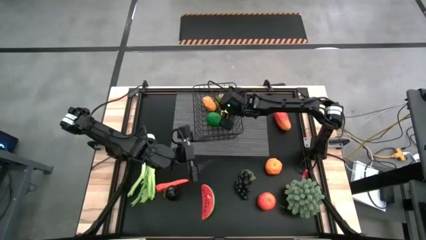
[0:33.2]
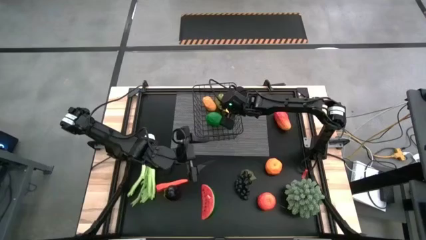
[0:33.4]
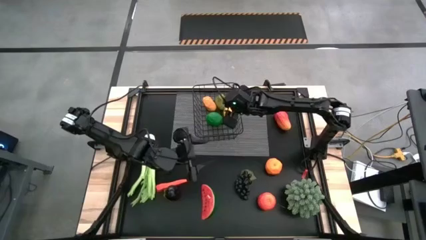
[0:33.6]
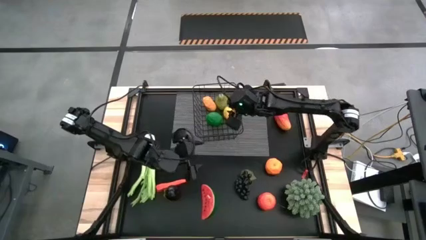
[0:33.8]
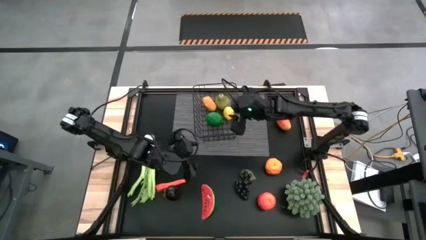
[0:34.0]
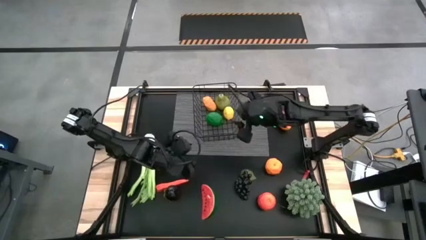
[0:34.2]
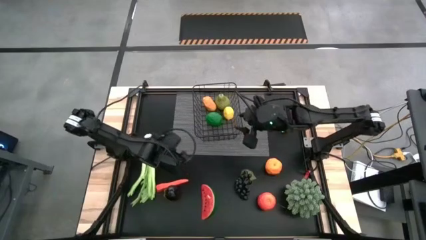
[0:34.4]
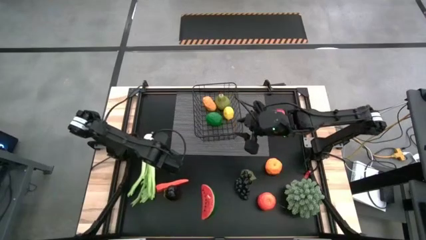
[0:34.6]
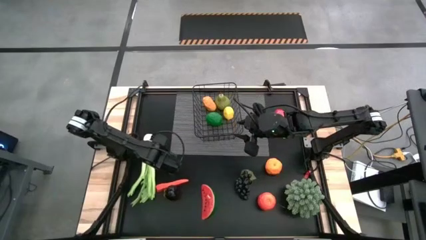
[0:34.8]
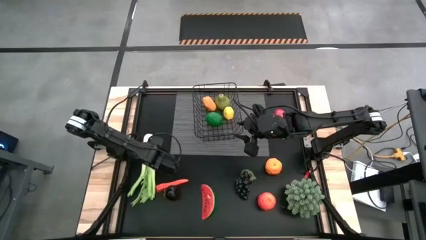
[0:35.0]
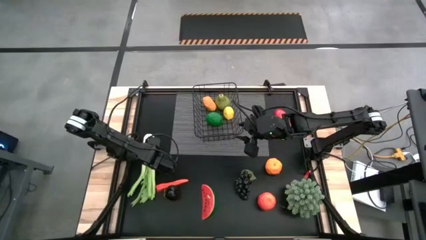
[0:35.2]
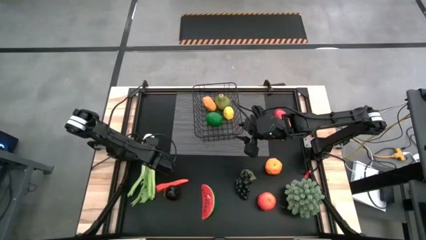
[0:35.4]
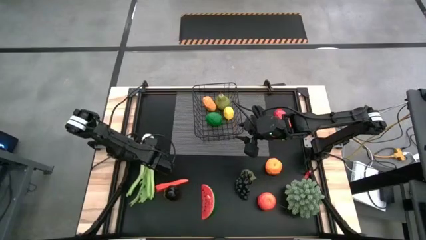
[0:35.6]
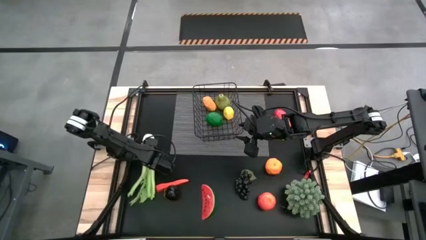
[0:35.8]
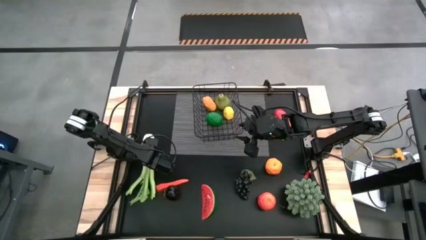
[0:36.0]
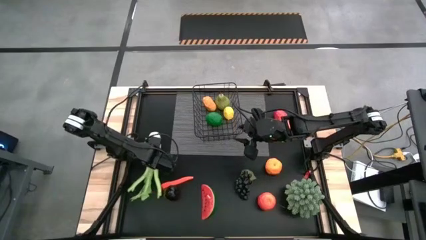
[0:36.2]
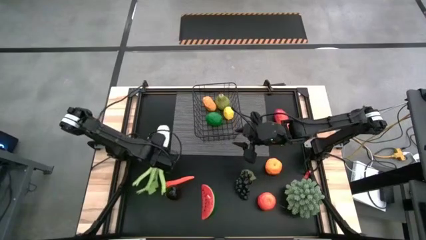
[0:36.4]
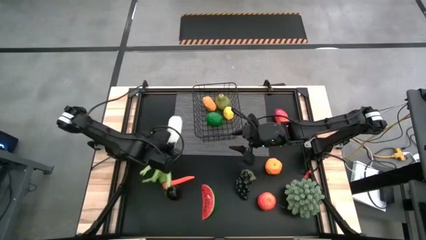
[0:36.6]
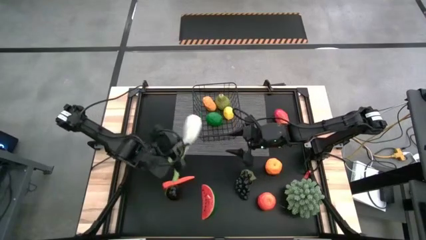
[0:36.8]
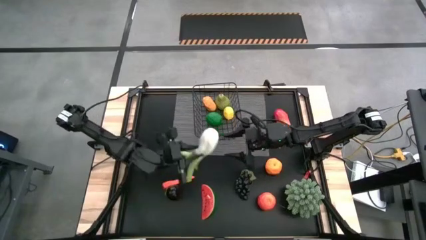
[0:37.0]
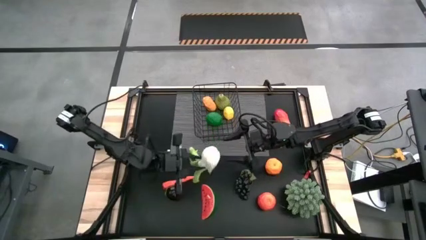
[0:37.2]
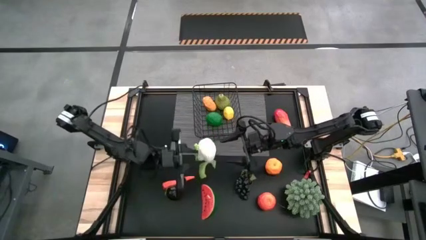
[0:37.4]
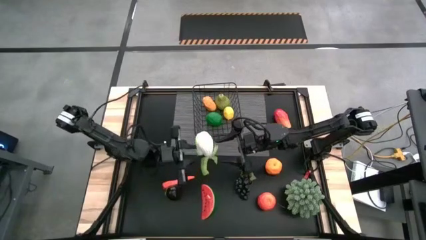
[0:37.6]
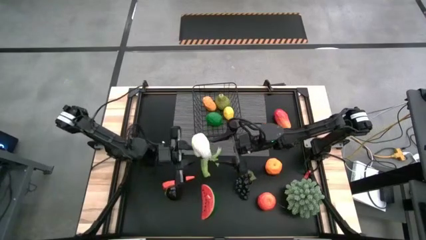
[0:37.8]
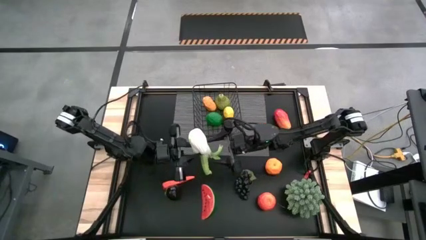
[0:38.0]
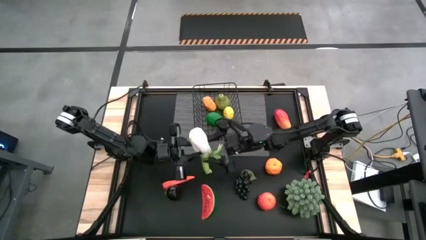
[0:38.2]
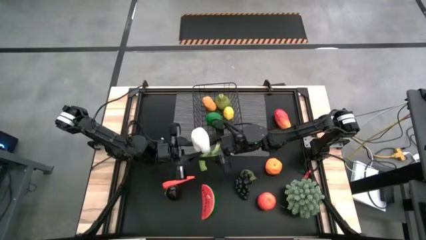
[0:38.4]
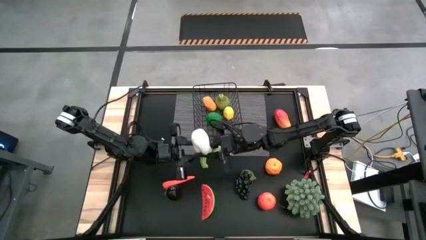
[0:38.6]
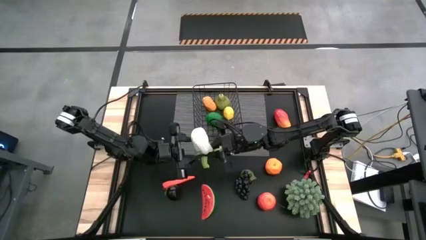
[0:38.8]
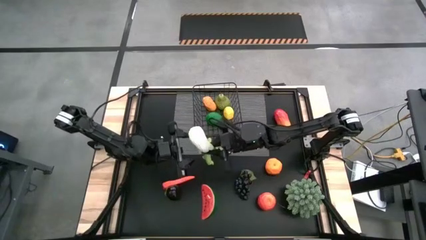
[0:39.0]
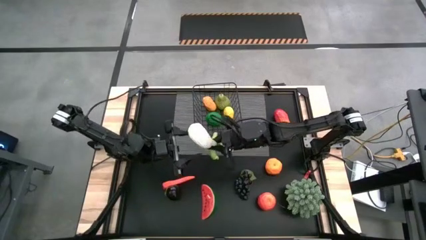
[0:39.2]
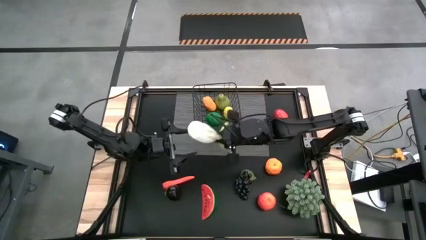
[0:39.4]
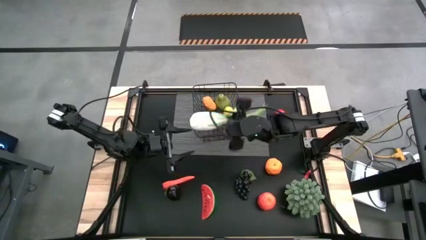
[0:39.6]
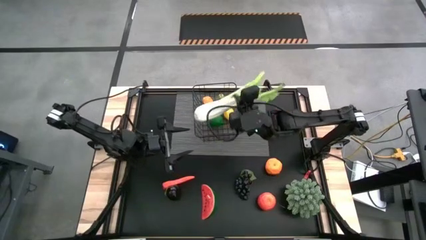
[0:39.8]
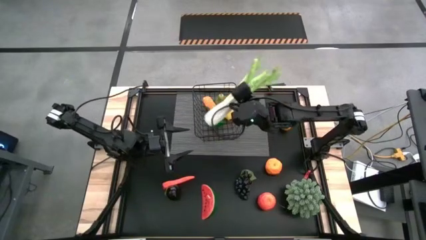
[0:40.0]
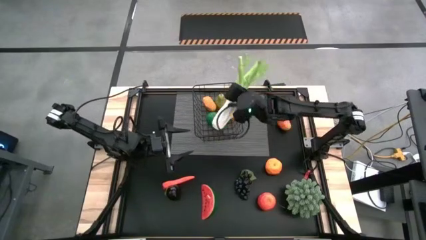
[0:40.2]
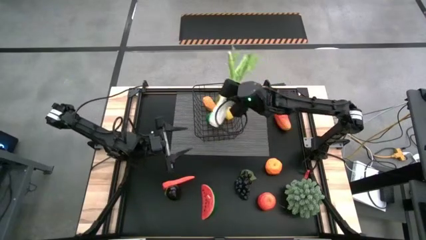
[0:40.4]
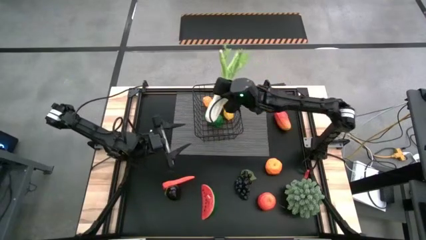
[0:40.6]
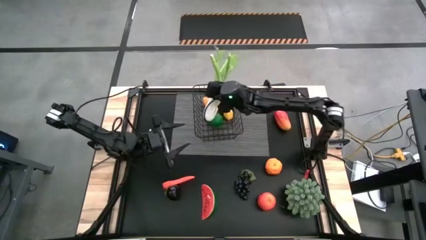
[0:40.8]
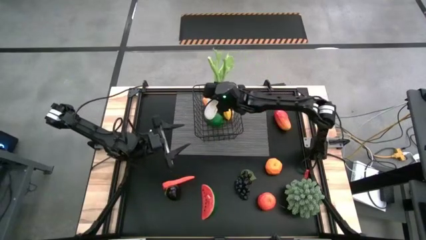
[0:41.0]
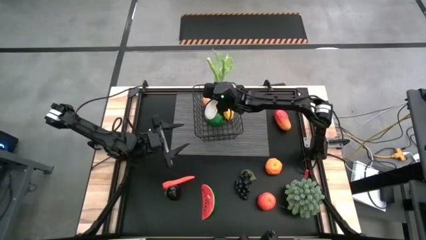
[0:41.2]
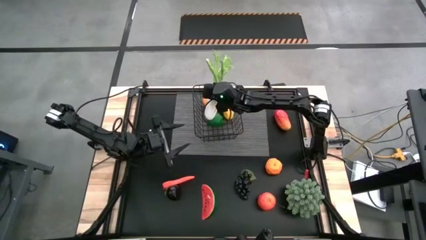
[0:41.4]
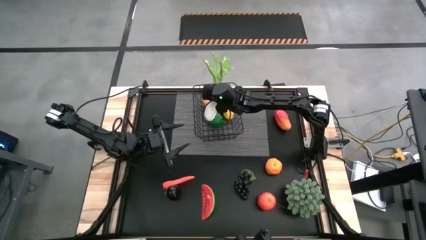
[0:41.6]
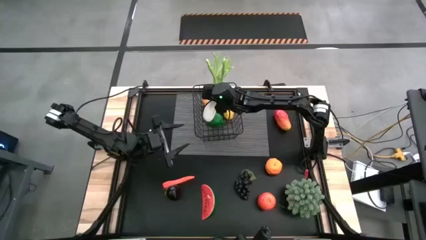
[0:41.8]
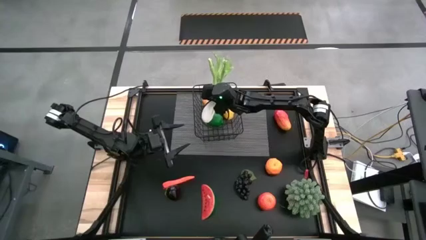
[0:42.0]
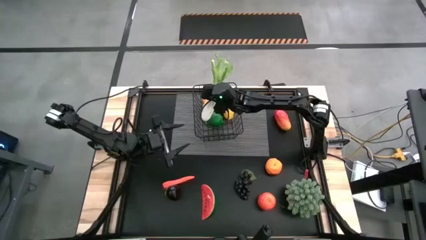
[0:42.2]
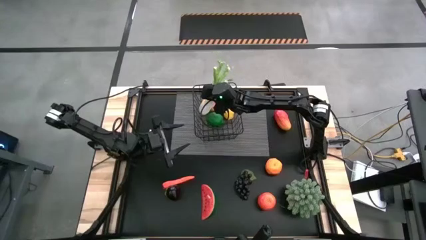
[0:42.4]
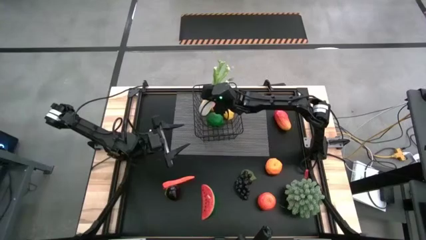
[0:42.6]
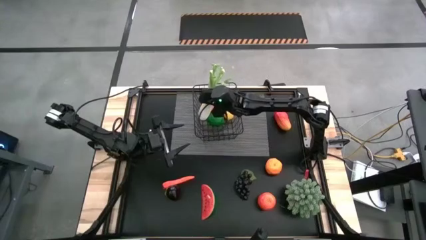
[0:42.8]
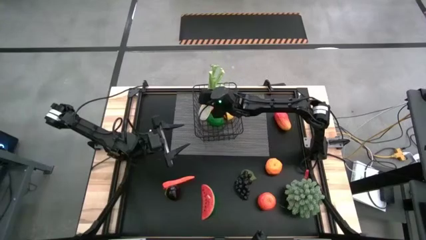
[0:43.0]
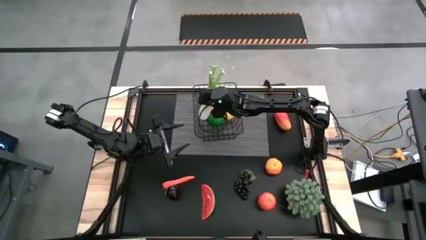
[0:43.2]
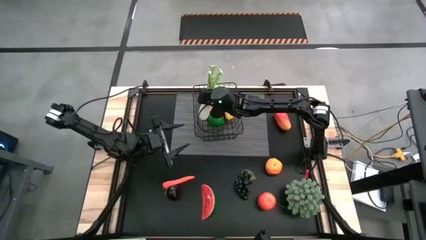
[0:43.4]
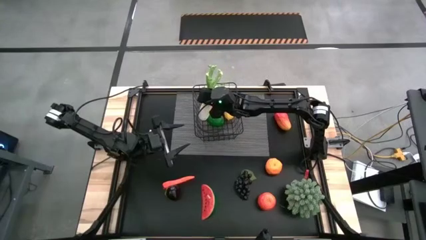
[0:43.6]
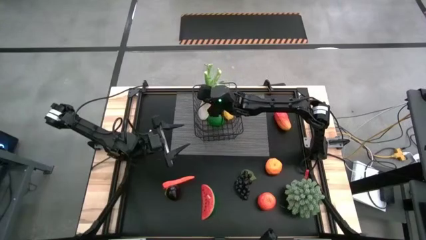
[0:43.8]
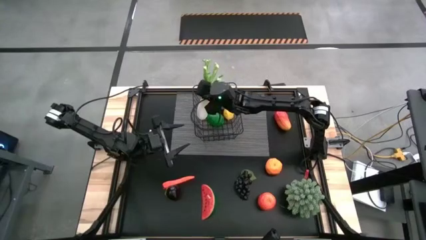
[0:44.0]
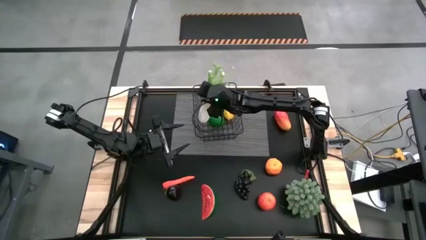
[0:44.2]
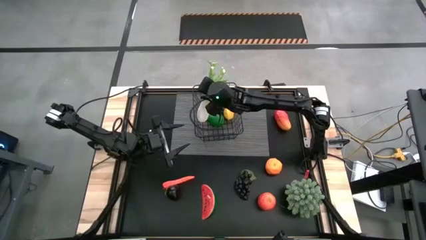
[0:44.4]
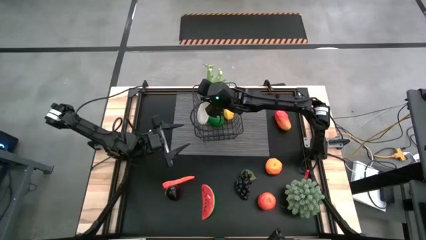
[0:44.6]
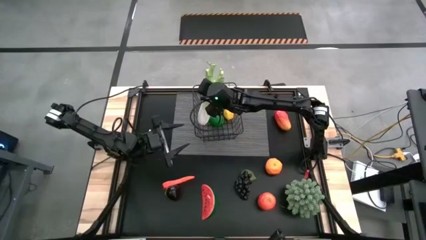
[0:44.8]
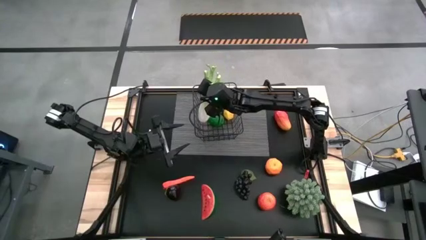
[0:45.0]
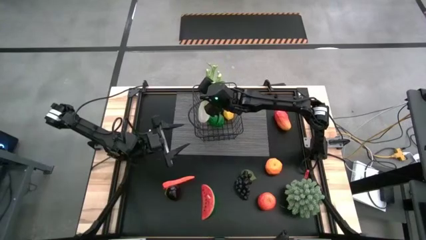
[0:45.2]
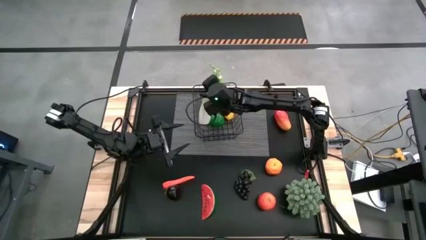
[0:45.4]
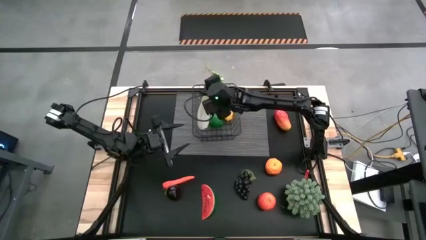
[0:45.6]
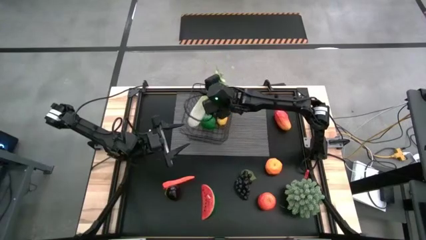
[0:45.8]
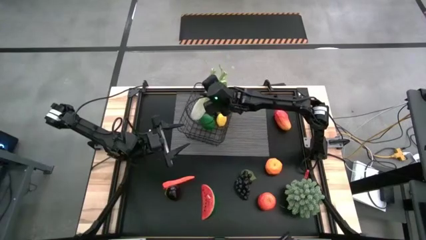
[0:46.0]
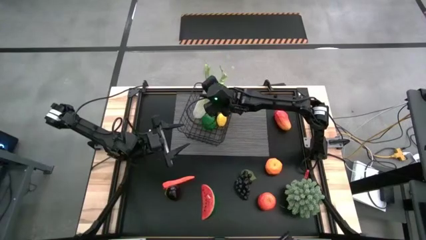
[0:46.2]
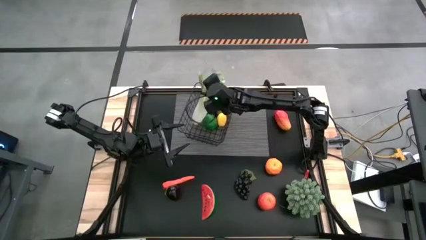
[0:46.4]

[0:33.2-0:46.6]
Task: Build produce basket
Put the celery into the wire basket

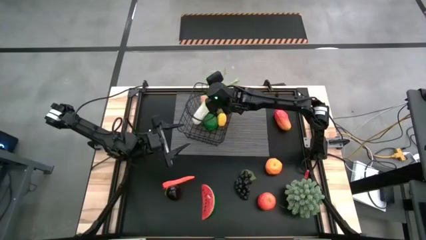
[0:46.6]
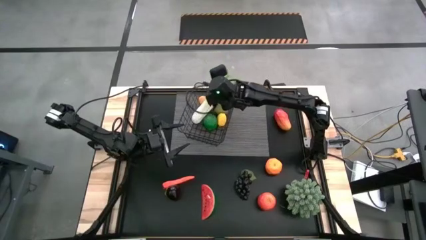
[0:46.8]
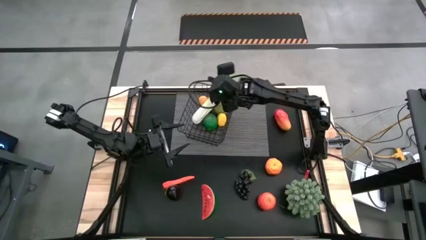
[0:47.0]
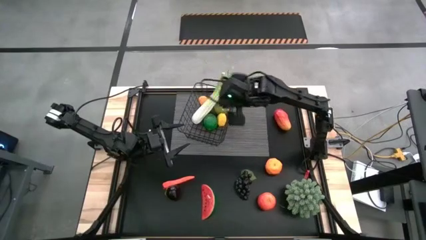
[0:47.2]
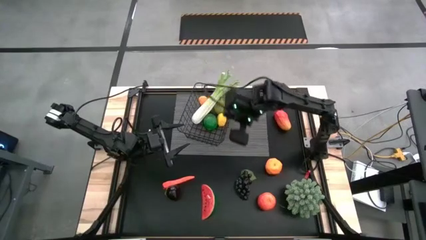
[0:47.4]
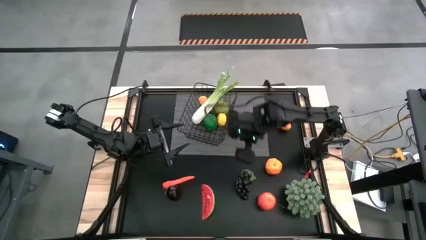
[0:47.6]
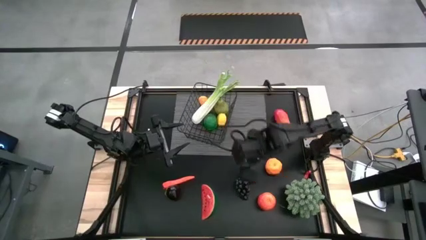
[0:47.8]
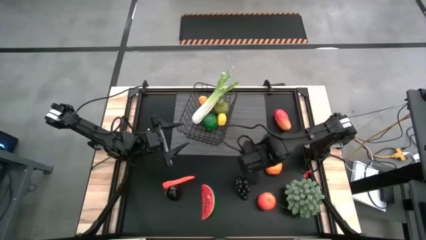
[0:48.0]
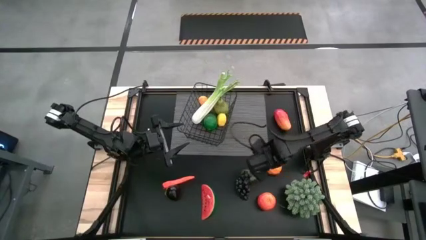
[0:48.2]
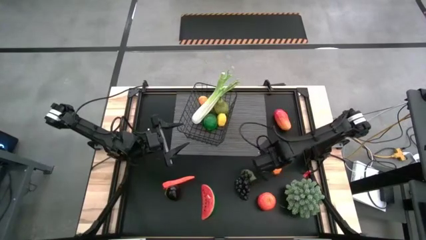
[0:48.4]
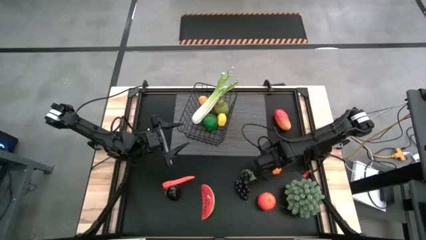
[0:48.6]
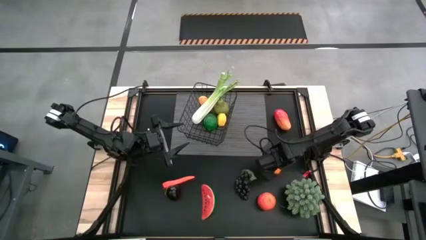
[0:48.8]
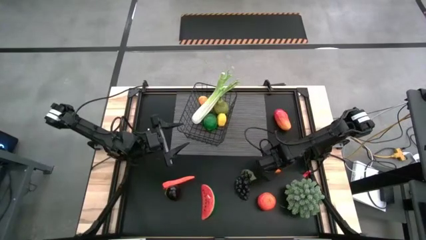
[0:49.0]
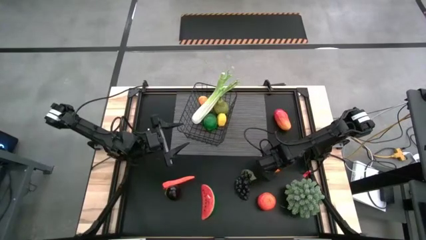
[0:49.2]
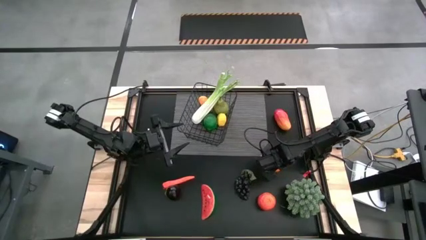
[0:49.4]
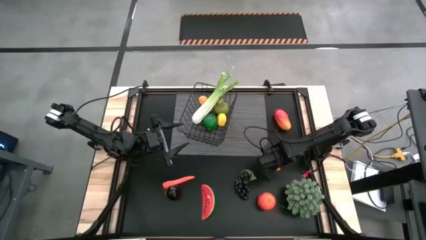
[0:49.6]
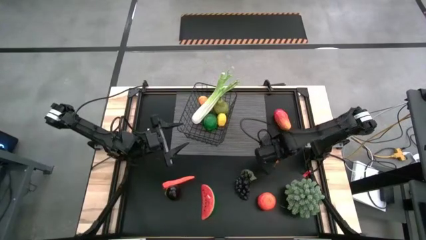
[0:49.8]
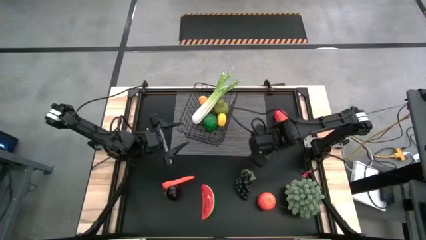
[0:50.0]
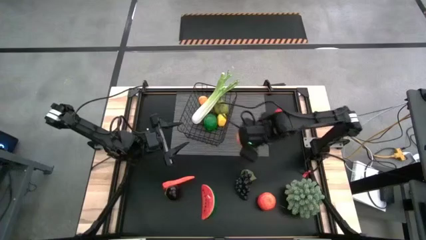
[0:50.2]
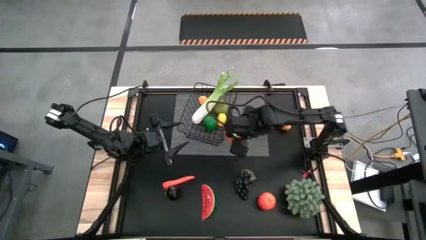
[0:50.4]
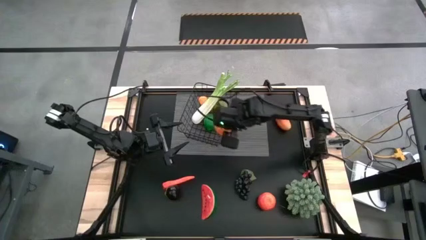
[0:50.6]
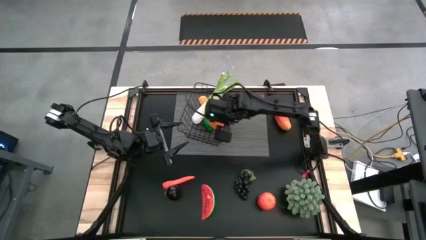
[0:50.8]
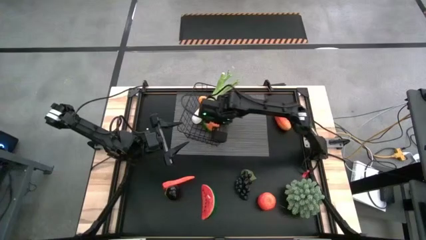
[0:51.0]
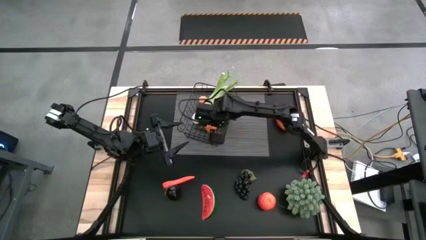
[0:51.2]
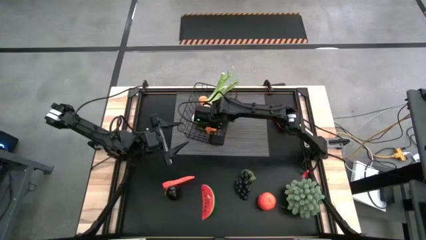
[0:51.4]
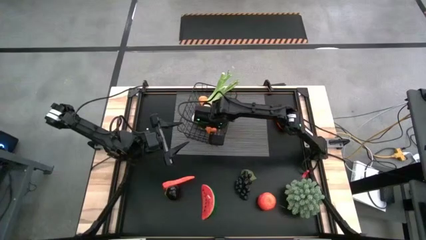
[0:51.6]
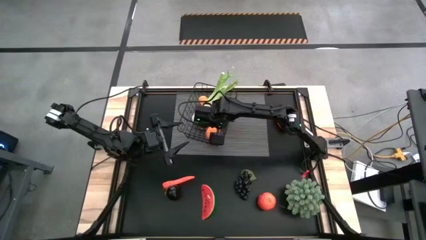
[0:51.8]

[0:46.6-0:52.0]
Put the orange into the wire basket
